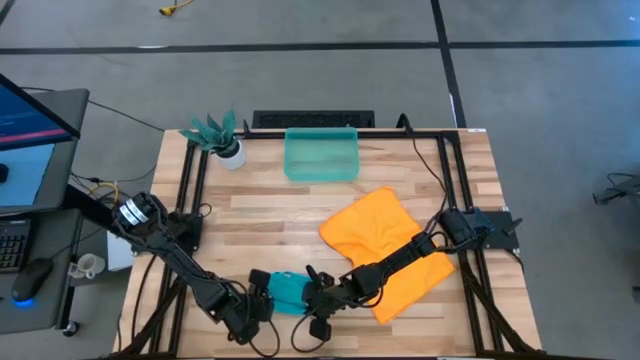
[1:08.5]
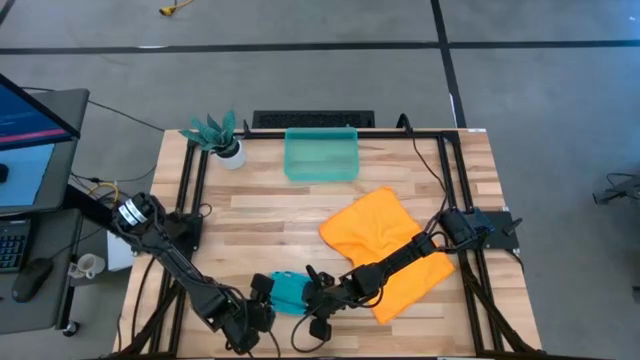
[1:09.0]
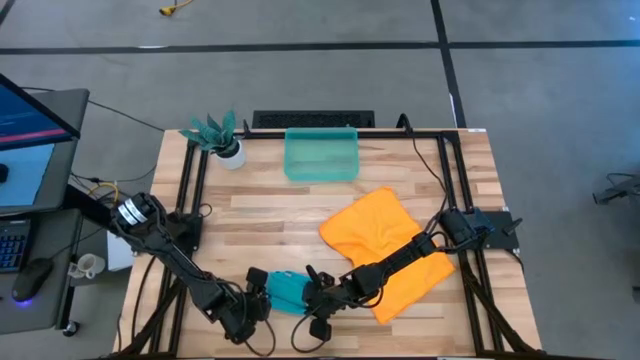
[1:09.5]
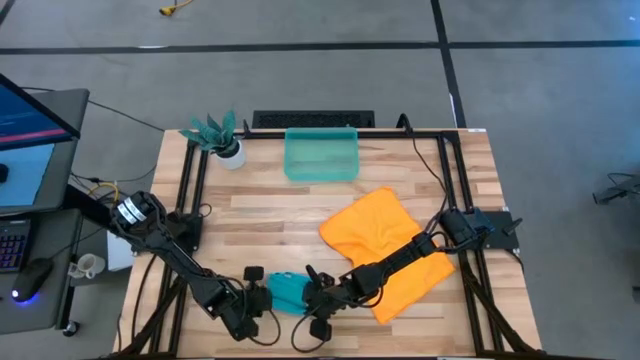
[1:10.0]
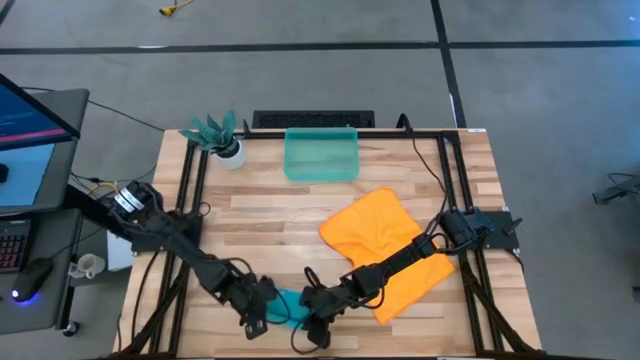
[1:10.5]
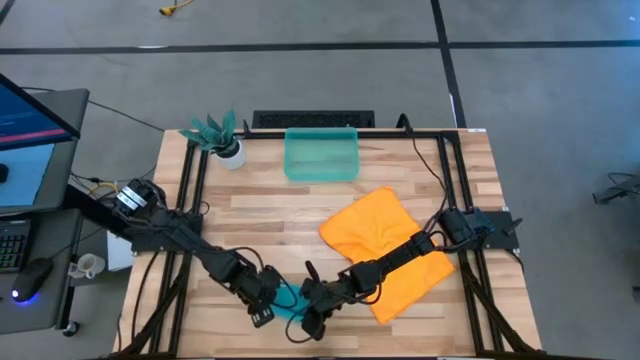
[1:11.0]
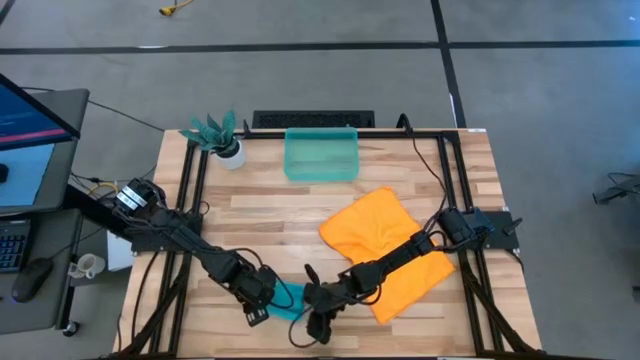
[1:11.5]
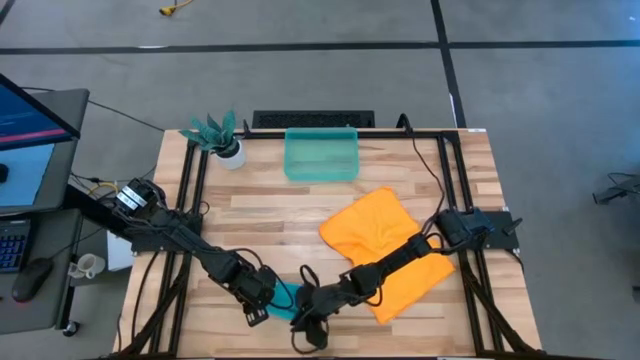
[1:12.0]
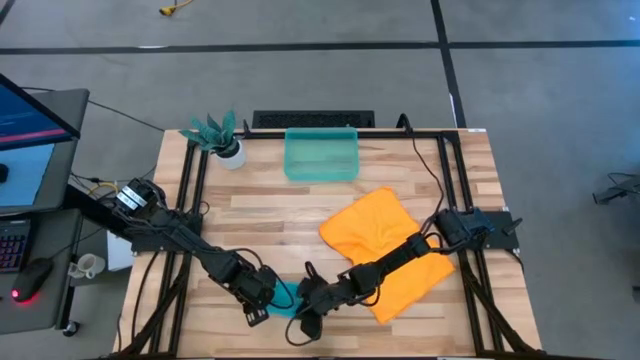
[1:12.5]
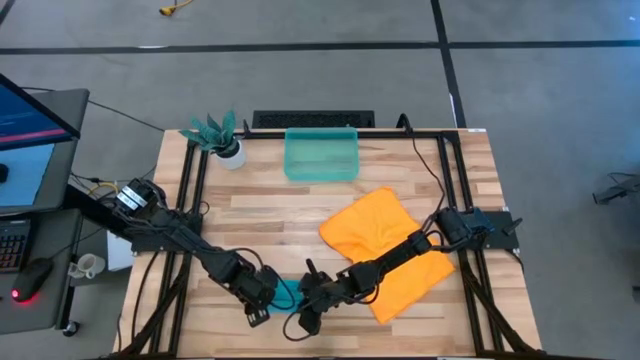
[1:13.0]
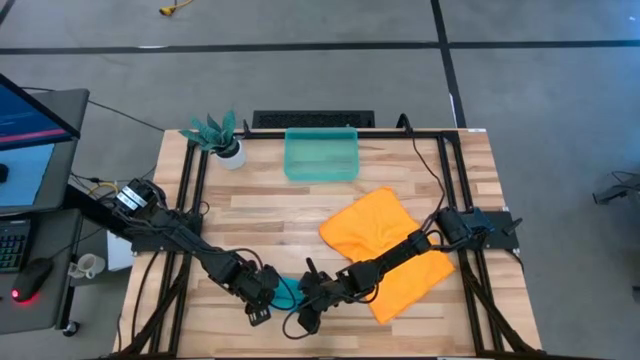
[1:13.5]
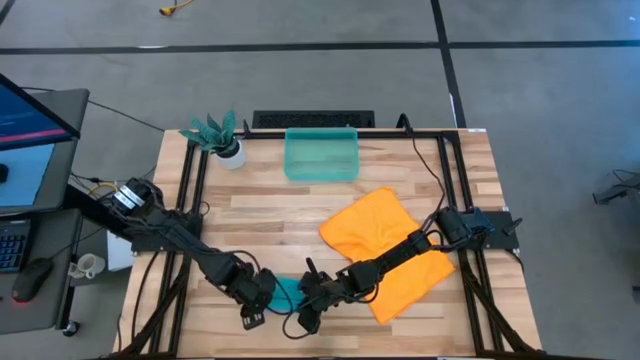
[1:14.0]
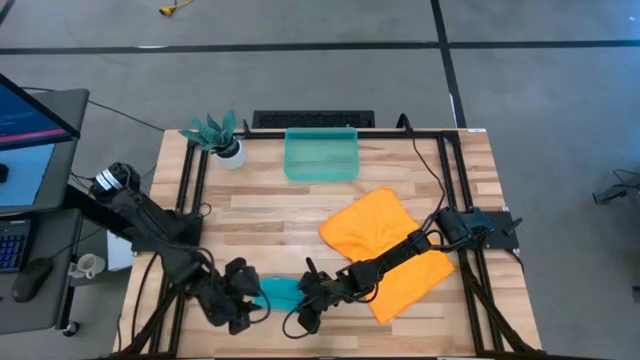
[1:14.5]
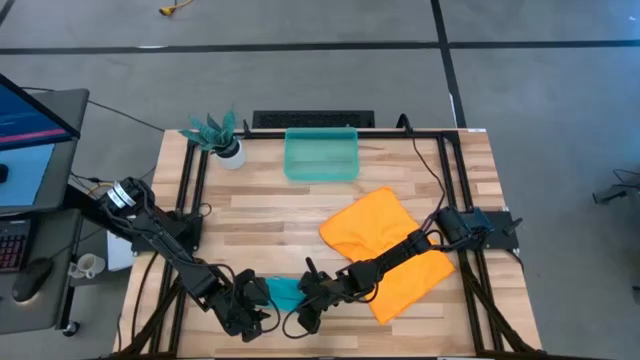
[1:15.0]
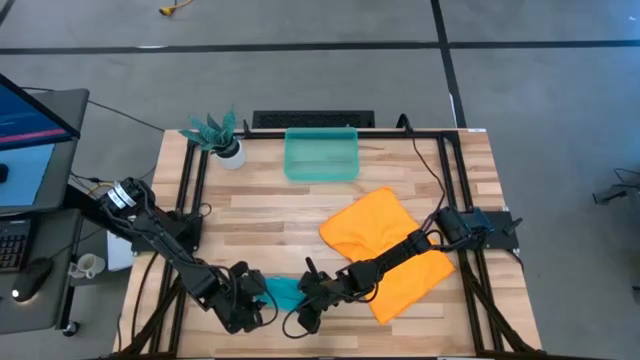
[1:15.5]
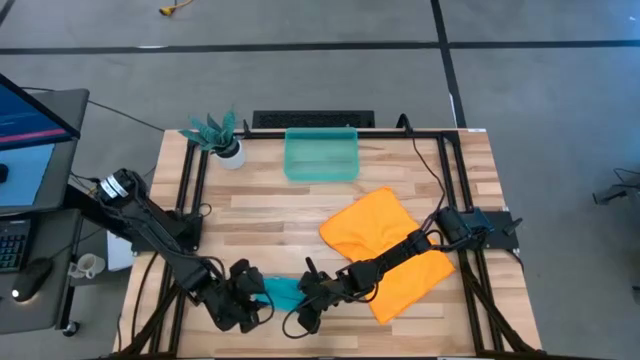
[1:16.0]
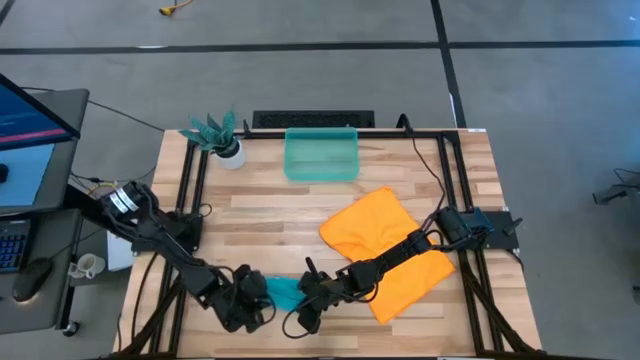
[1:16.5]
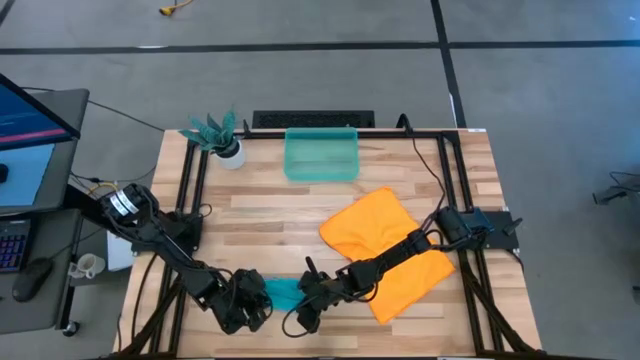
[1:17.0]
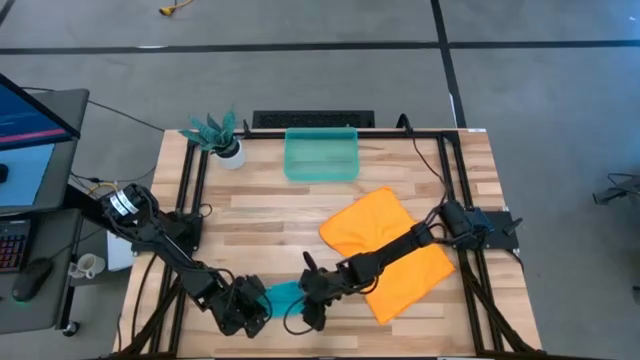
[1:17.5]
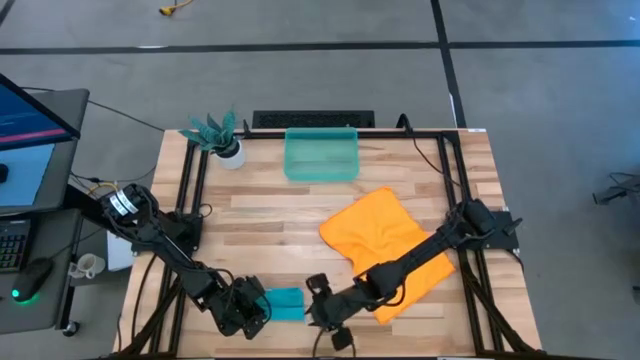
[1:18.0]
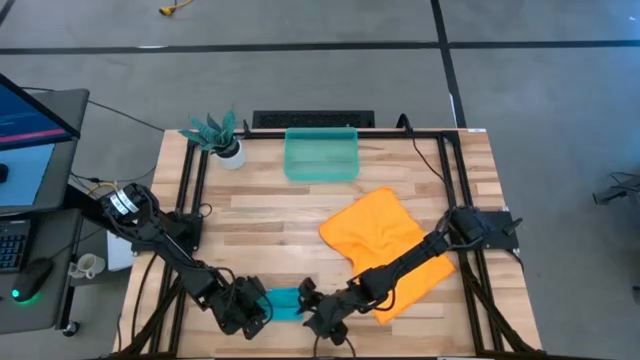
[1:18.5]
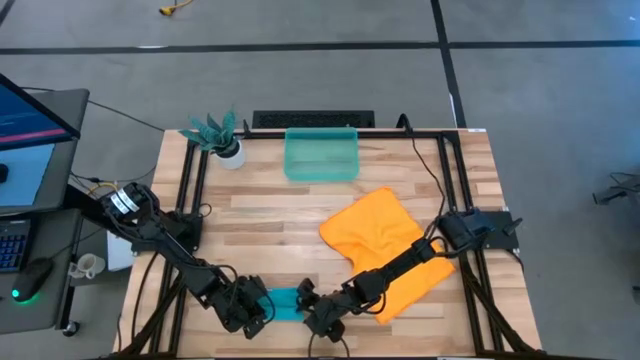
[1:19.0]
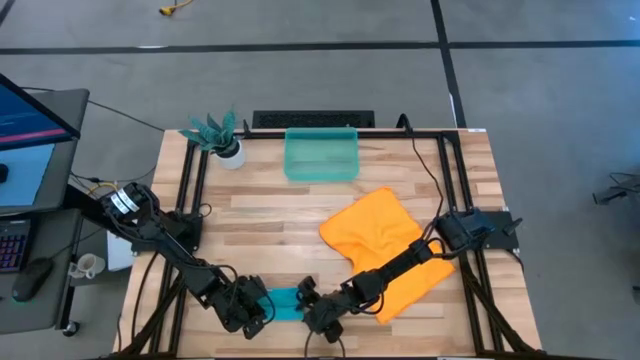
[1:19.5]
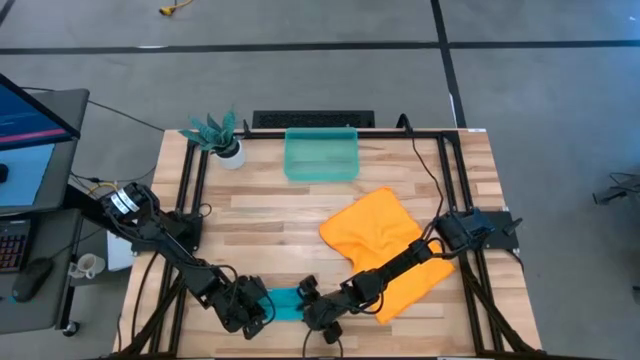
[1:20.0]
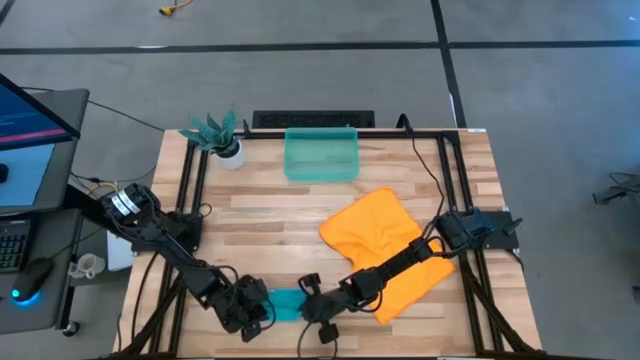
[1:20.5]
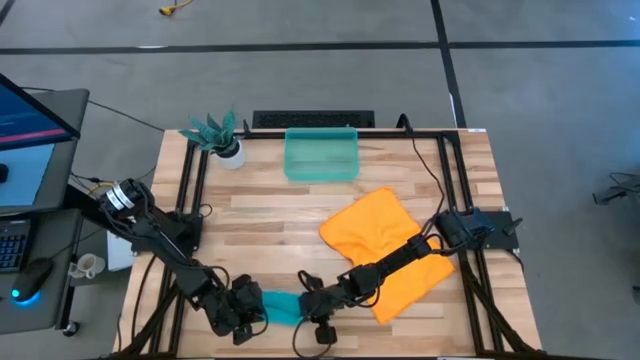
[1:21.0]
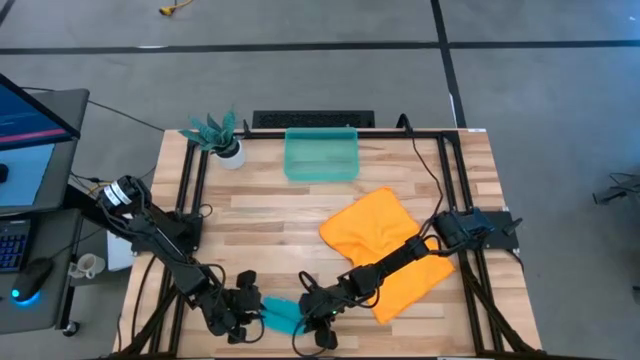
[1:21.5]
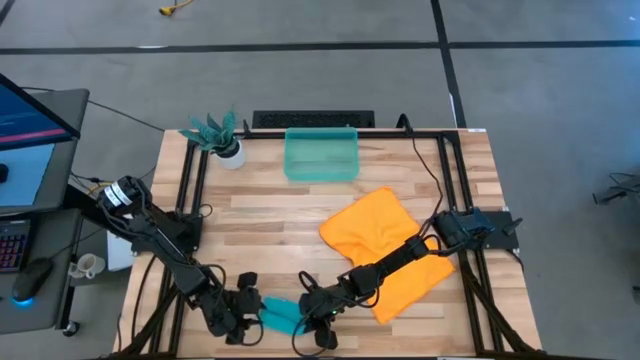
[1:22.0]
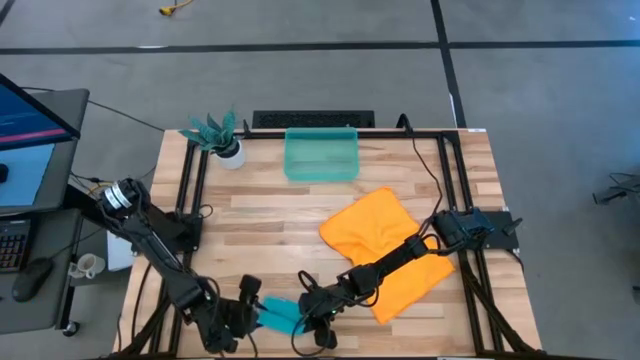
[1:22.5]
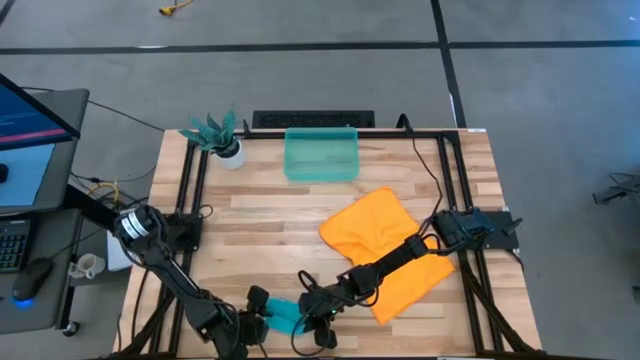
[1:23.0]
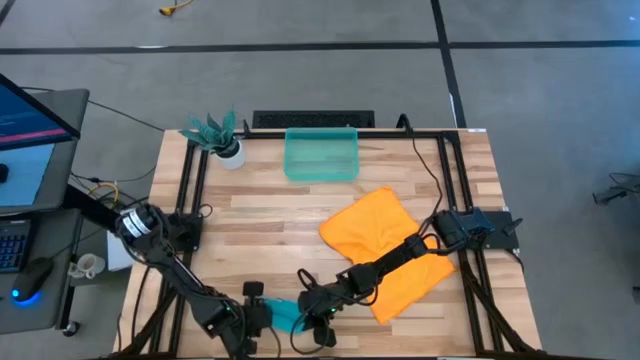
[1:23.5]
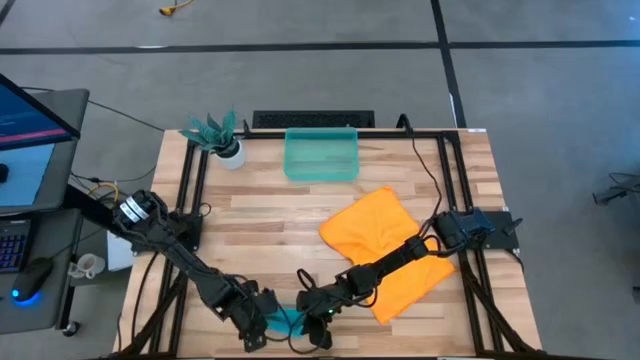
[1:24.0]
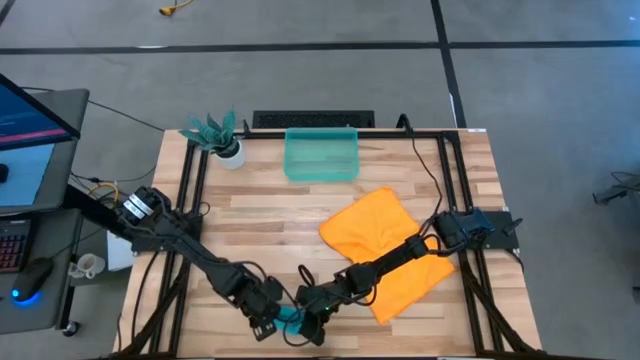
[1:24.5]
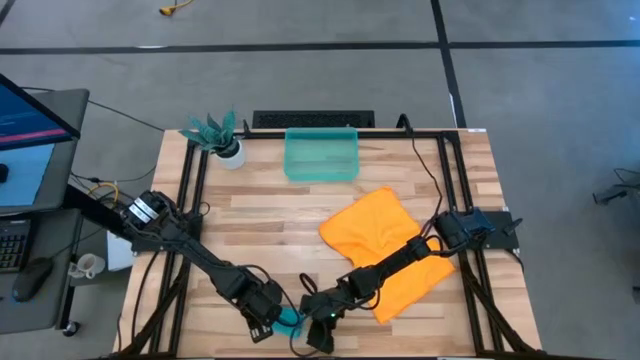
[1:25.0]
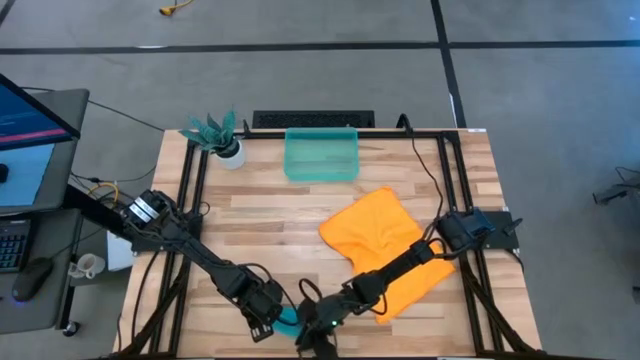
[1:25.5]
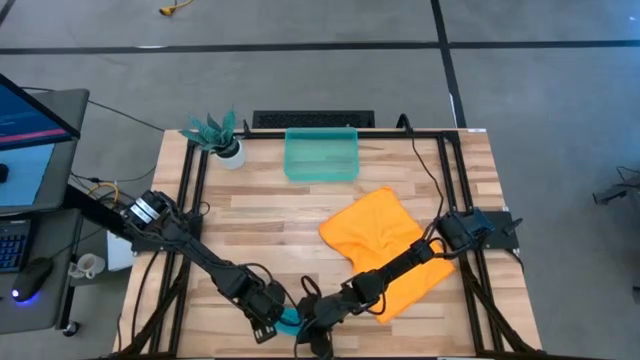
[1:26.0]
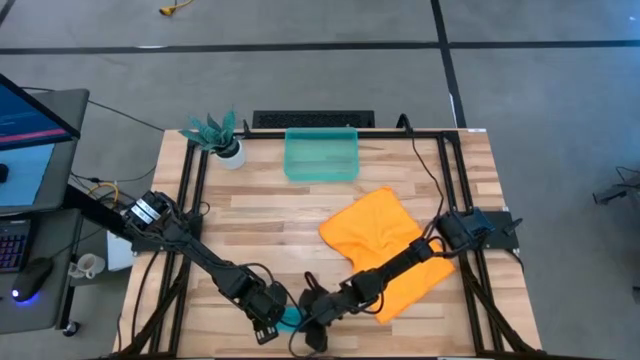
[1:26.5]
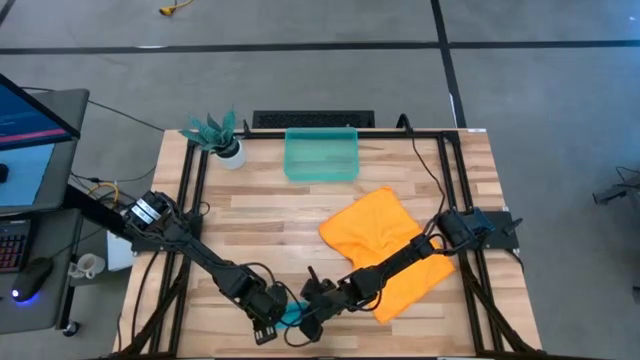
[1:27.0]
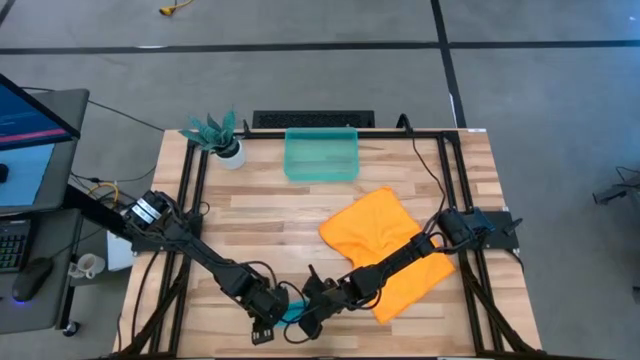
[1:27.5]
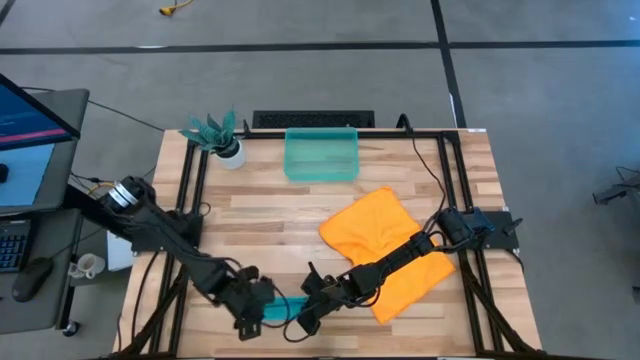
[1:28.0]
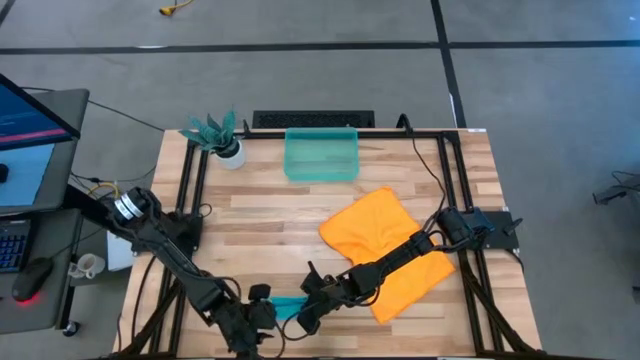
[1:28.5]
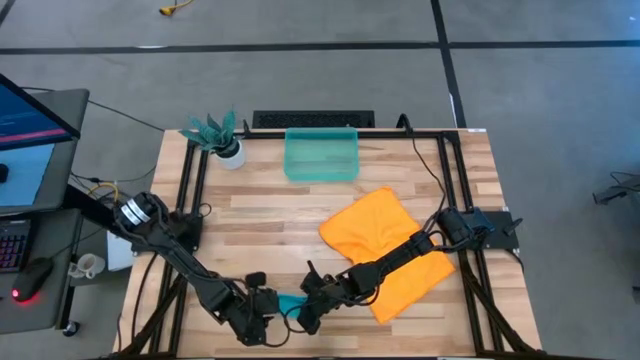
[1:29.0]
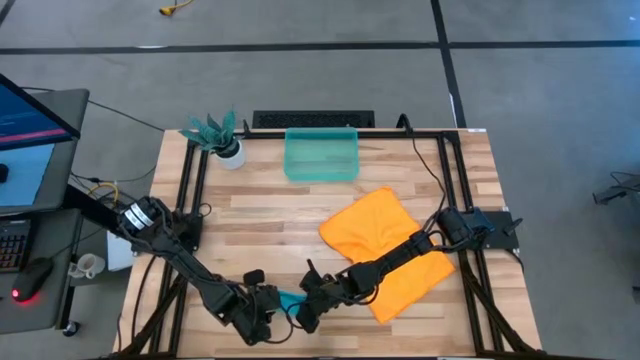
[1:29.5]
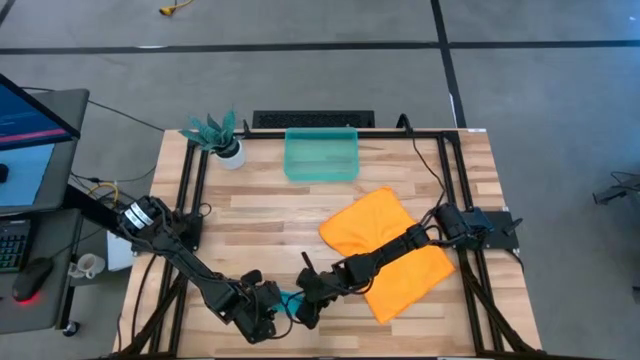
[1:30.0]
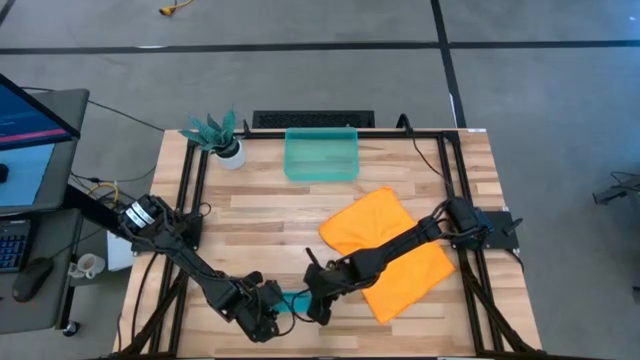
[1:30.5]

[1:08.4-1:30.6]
Task: Roll microfiber towels into tight, uniform cylinder then place into a basket
Roll the blue microfiber cloth
